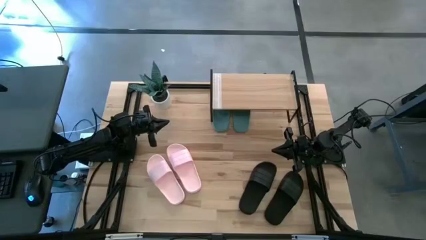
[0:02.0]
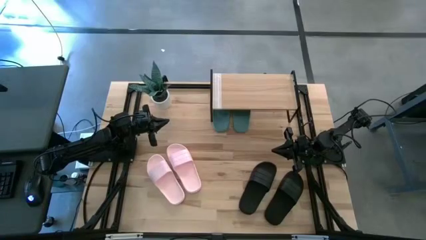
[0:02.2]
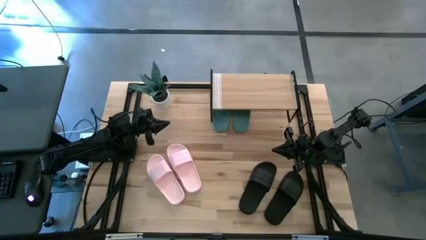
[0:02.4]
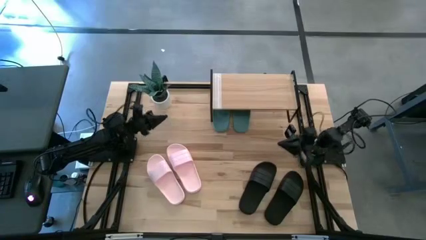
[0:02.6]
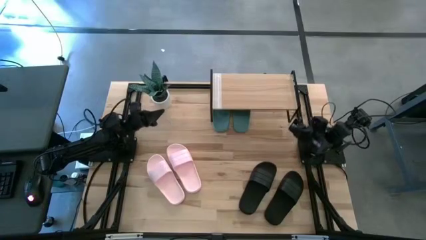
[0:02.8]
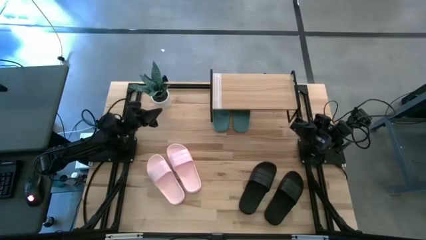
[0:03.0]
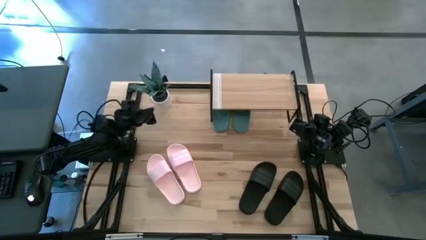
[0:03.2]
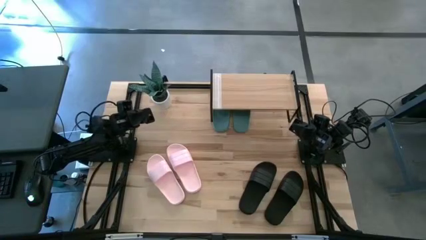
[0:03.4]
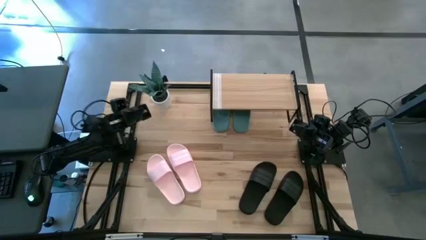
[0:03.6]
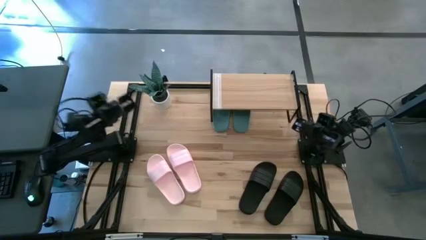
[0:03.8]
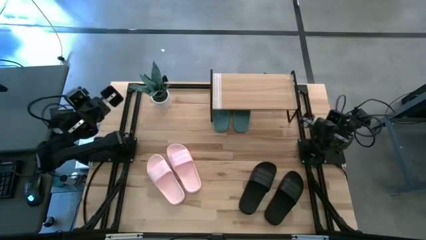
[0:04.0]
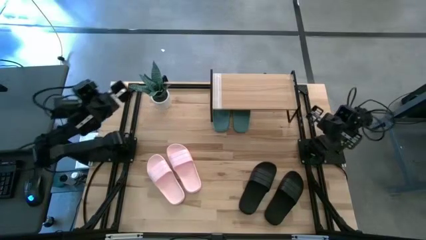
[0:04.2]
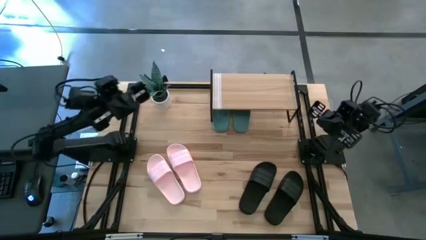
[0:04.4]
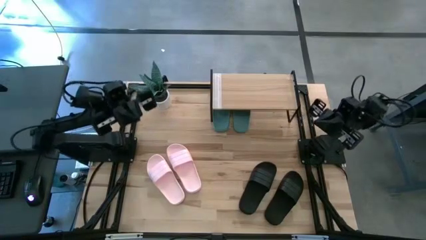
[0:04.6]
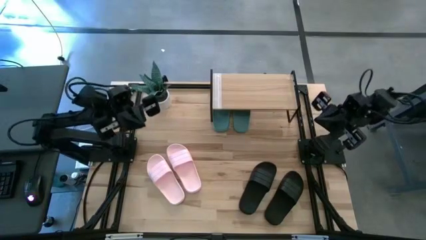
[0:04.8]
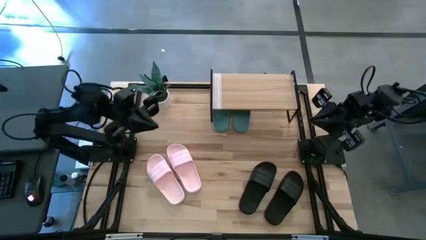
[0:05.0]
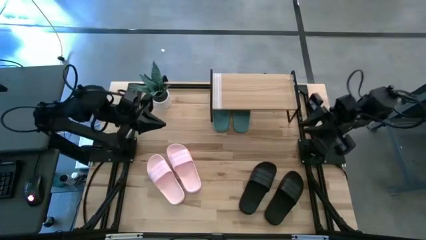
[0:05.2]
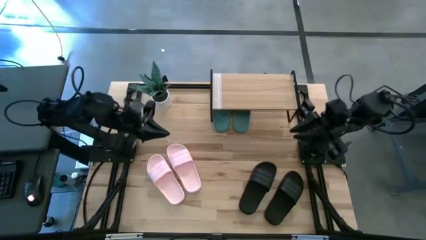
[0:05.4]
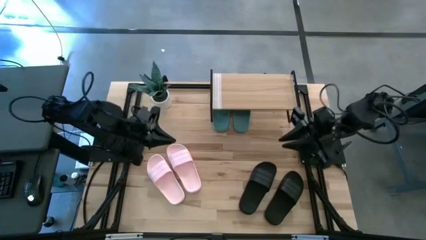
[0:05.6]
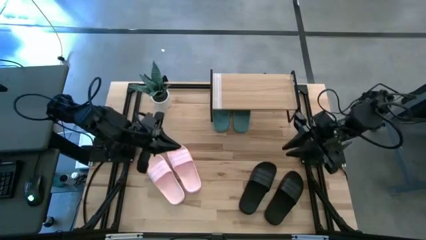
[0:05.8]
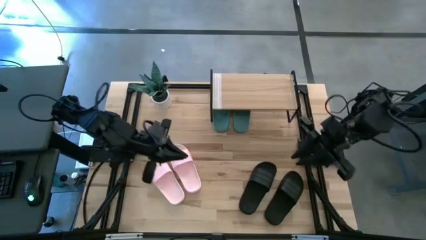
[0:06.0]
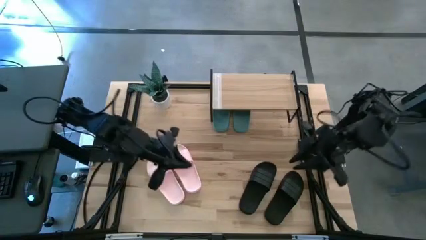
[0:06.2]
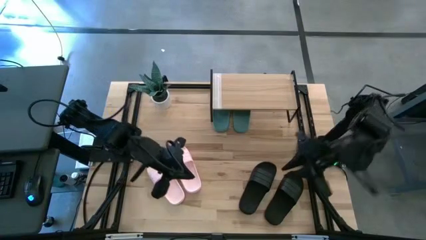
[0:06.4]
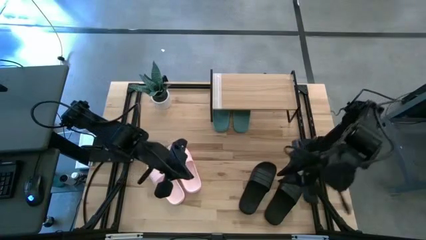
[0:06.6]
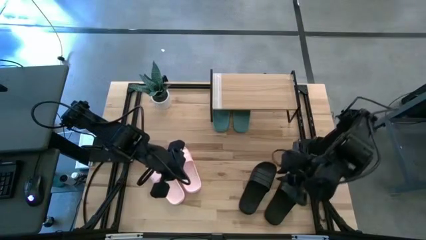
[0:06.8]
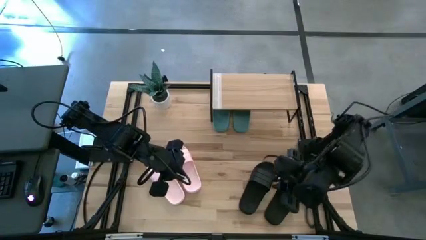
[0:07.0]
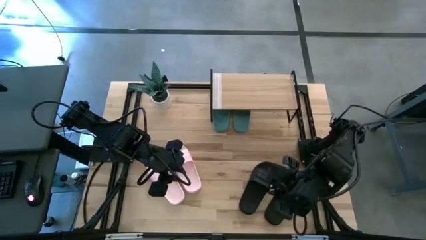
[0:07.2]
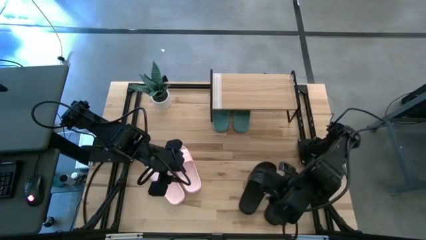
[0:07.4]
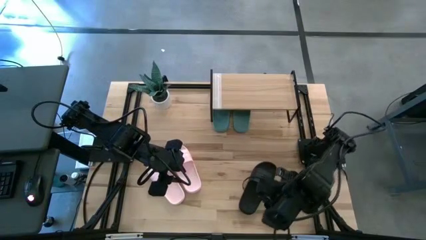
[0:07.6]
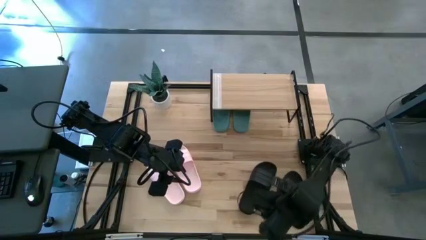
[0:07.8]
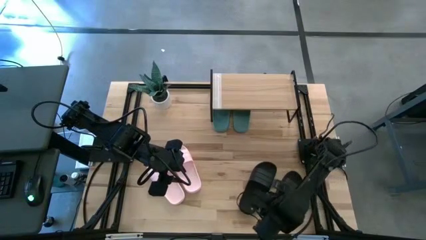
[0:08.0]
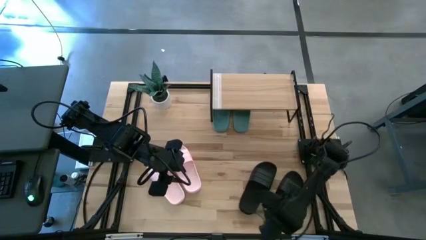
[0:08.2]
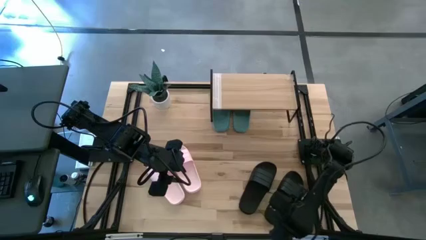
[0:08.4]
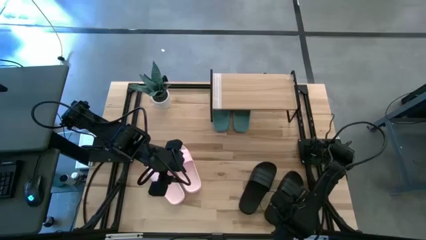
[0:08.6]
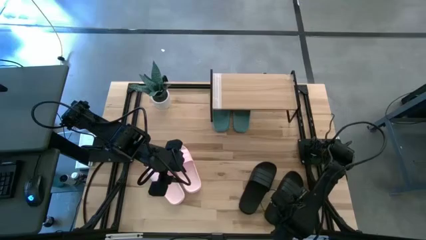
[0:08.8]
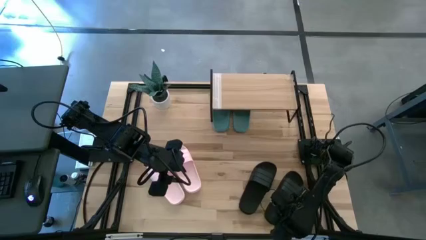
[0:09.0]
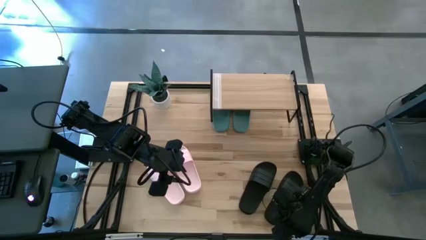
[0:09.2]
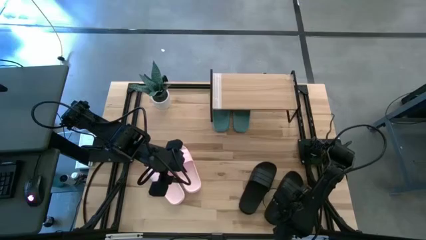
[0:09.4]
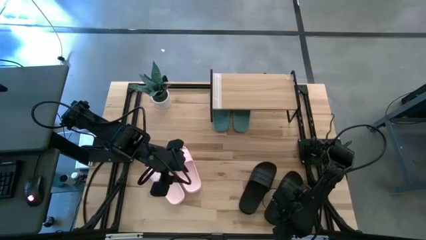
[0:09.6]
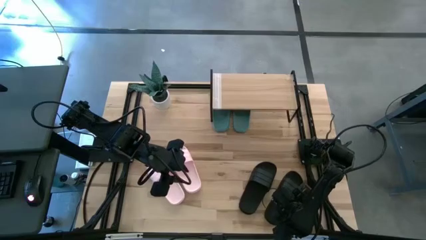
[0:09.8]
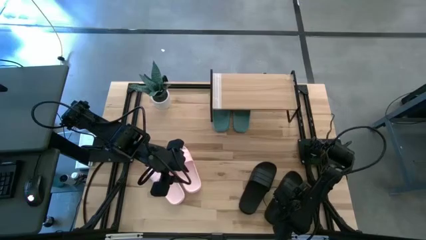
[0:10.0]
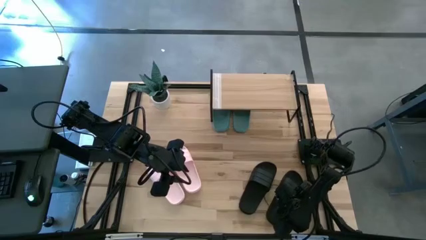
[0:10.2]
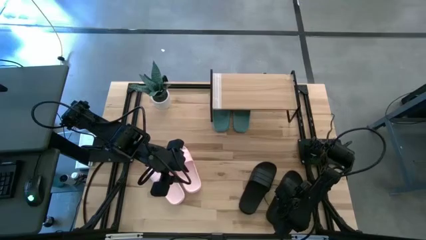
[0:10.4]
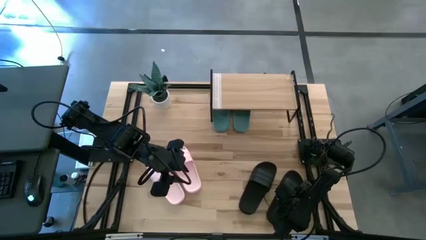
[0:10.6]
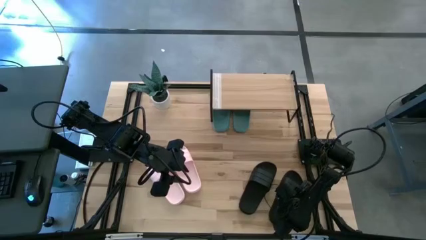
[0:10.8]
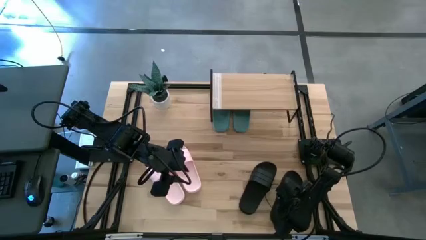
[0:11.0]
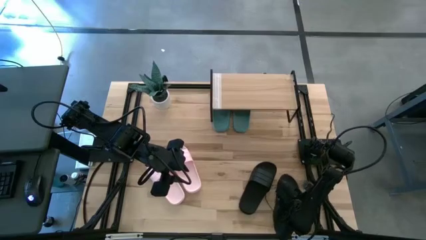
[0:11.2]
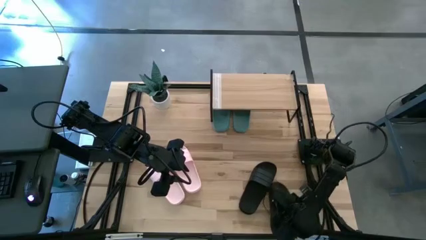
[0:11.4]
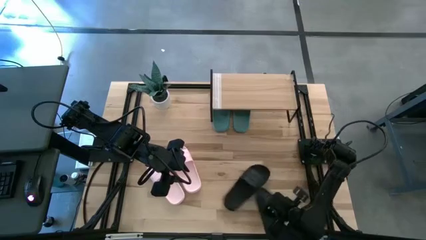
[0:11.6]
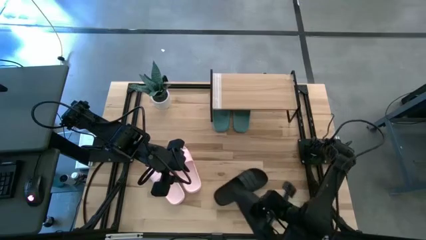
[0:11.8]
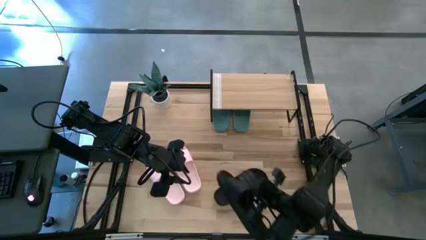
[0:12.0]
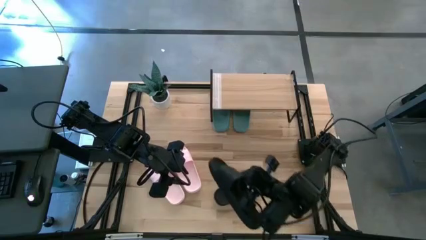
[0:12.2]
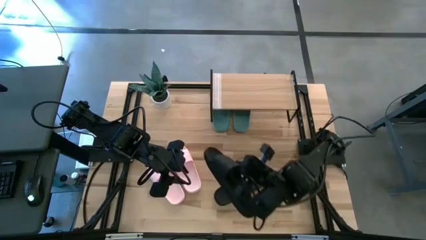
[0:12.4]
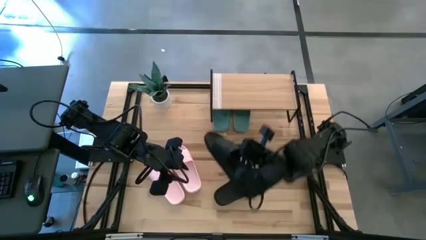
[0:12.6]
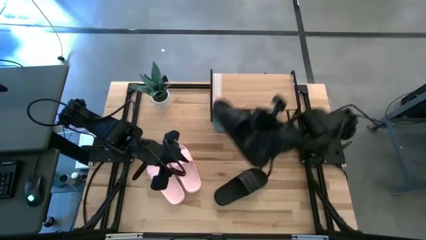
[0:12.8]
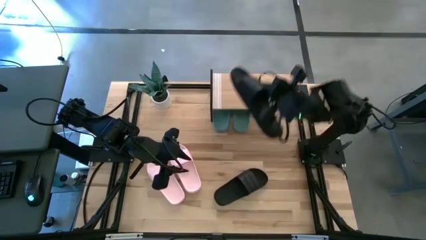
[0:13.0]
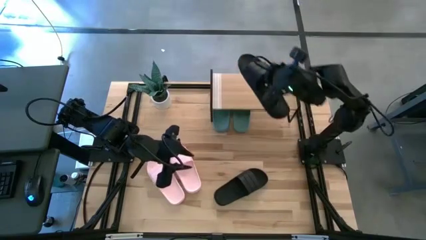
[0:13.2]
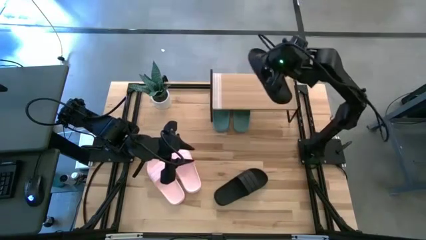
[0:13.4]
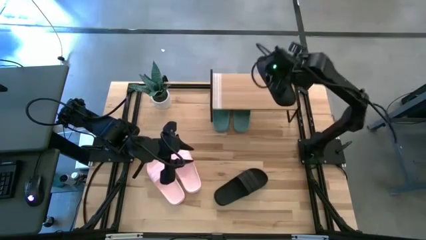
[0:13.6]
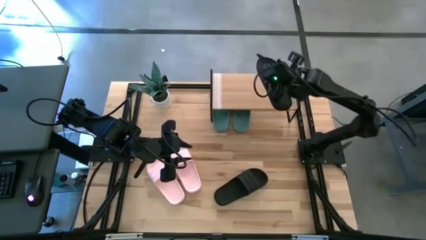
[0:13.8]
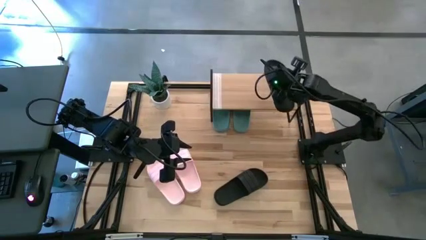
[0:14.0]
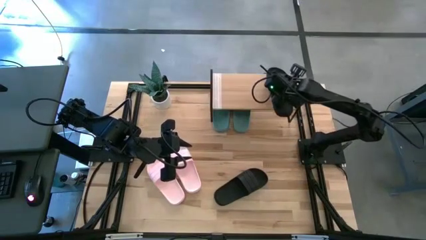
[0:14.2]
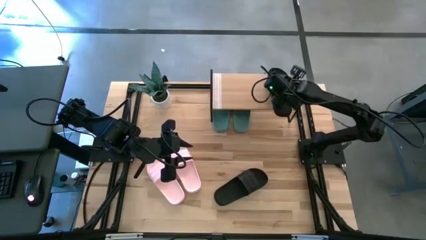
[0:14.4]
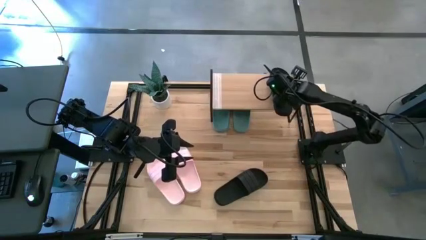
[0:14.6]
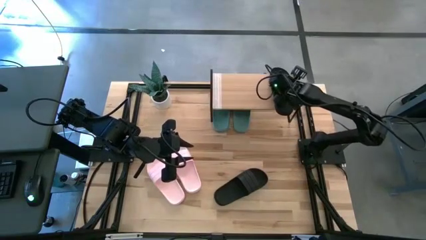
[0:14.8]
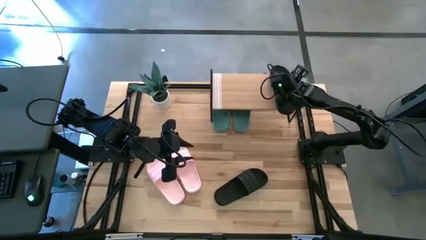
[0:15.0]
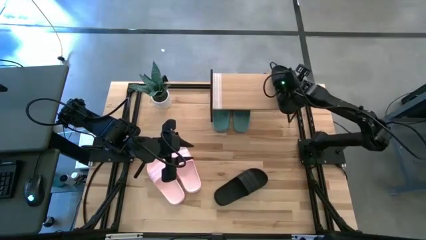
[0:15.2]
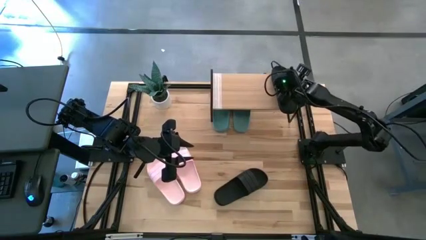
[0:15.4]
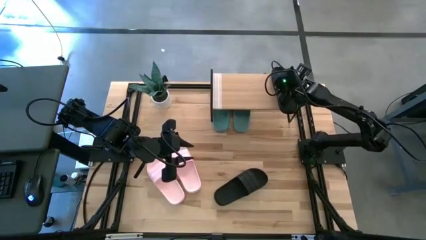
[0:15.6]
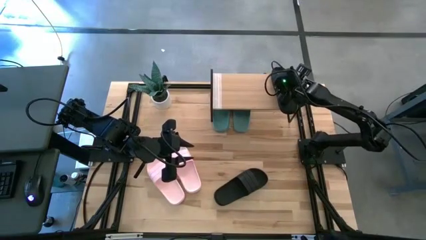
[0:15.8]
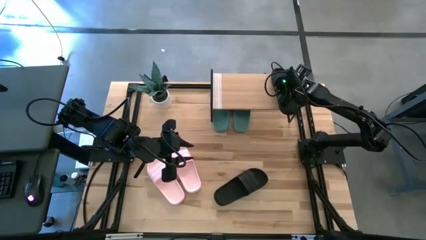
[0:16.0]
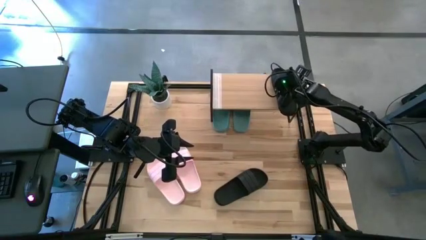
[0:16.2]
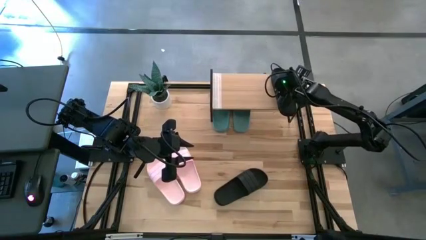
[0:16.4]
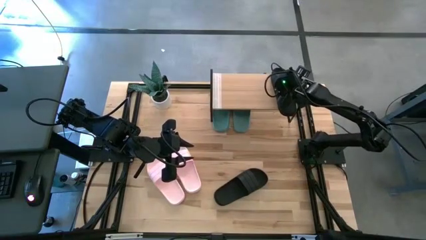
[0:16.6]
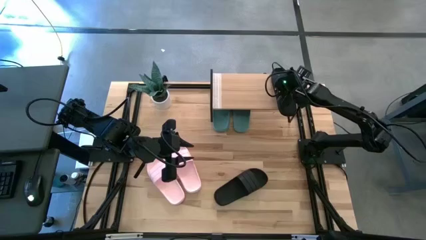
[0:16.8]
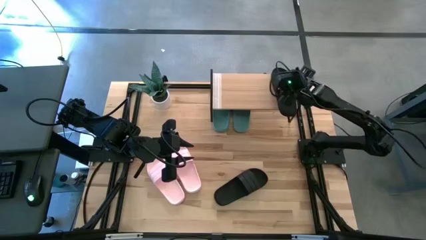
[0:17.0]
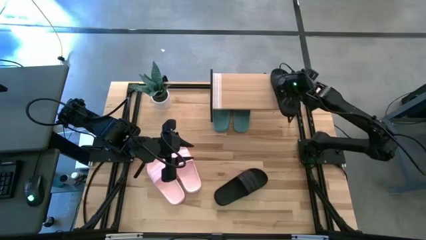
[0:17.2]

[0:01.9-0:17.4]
Task: Pick and place slides into the shelf
Put the right black slipper on the shelf
